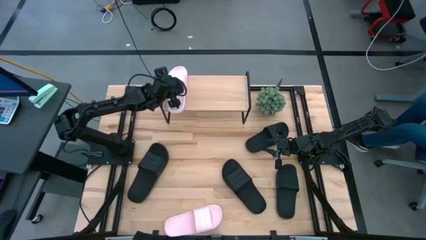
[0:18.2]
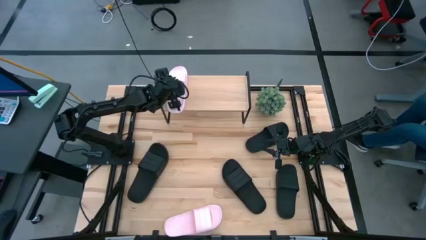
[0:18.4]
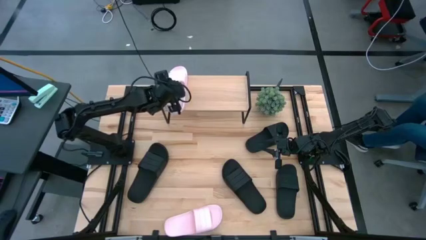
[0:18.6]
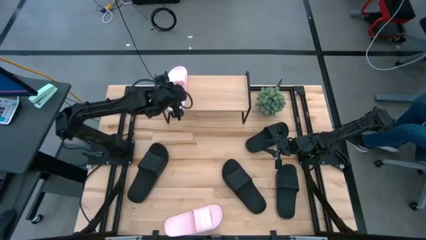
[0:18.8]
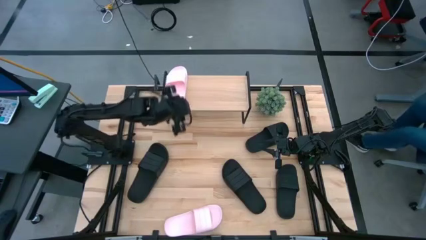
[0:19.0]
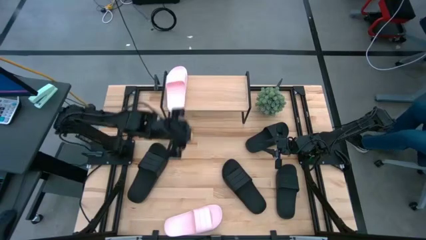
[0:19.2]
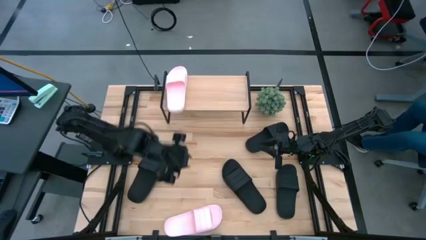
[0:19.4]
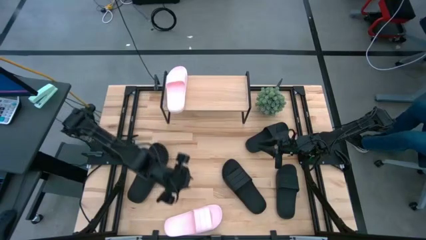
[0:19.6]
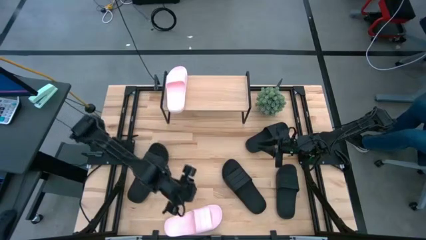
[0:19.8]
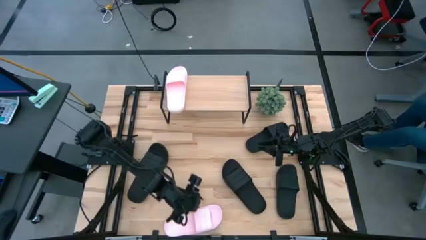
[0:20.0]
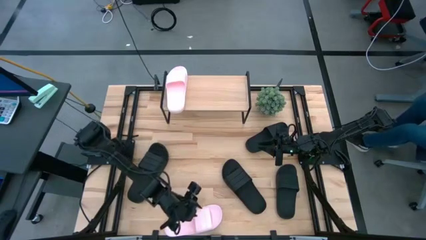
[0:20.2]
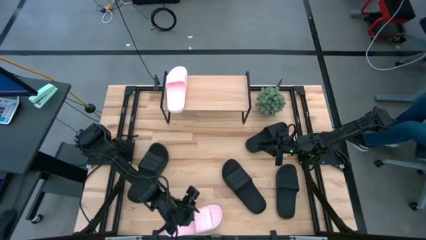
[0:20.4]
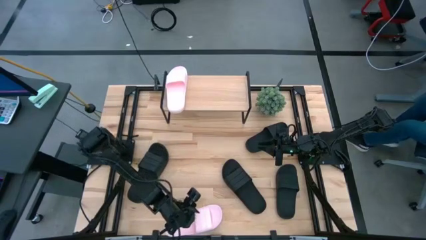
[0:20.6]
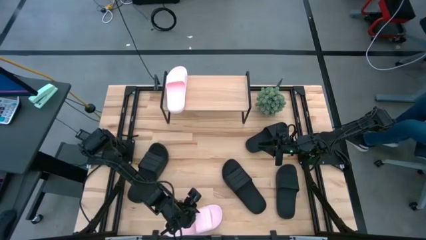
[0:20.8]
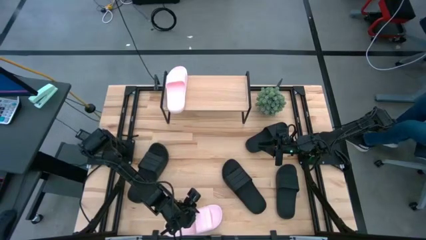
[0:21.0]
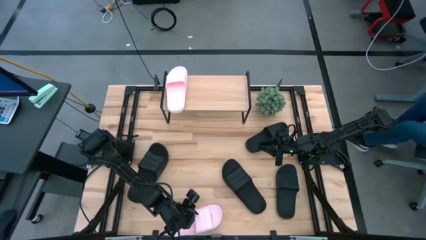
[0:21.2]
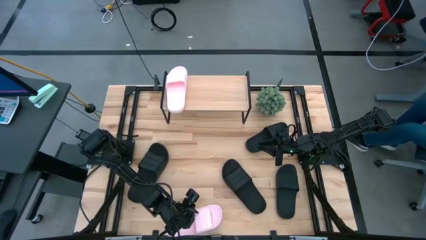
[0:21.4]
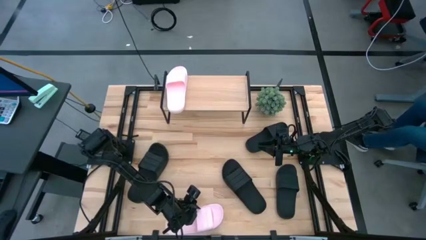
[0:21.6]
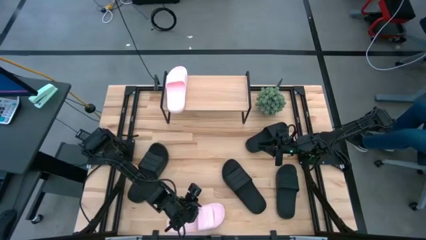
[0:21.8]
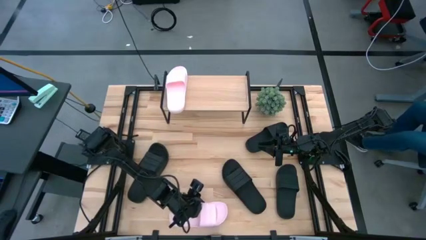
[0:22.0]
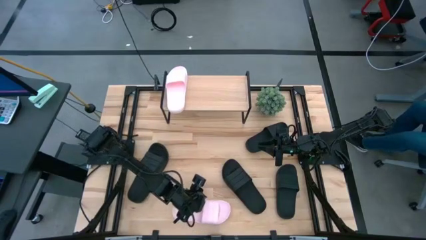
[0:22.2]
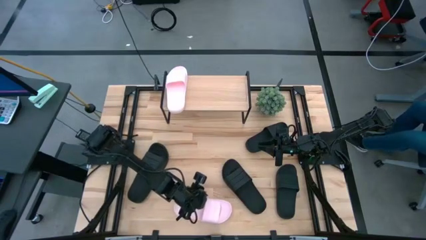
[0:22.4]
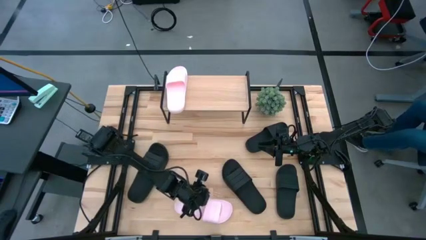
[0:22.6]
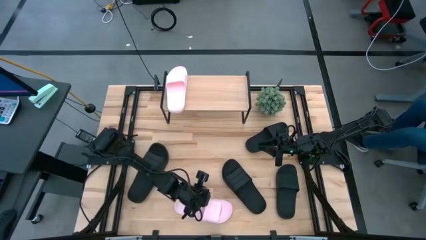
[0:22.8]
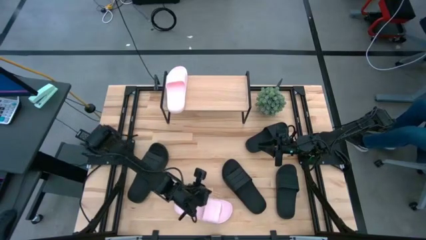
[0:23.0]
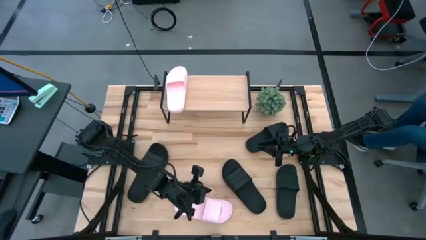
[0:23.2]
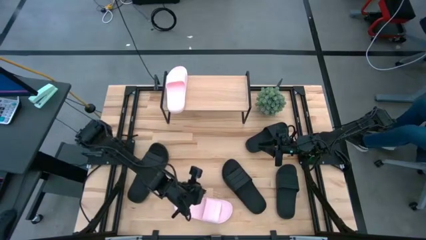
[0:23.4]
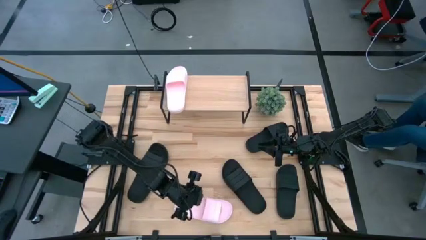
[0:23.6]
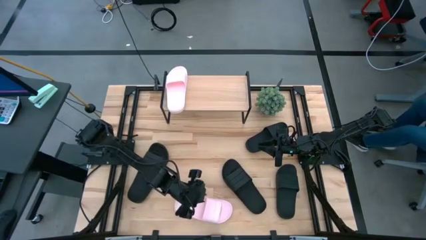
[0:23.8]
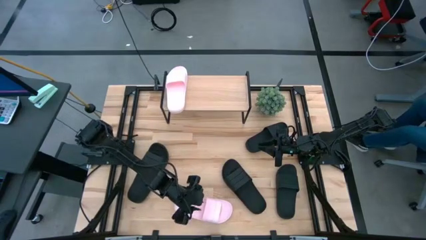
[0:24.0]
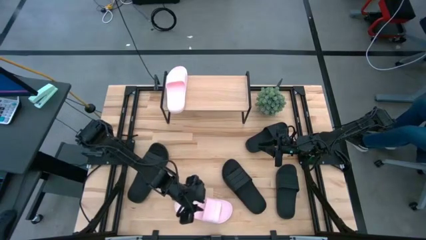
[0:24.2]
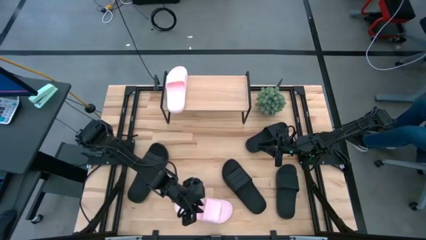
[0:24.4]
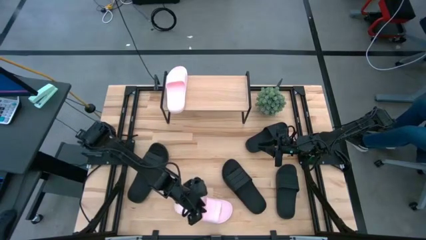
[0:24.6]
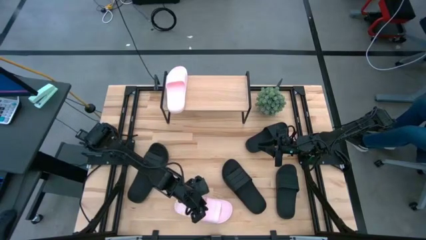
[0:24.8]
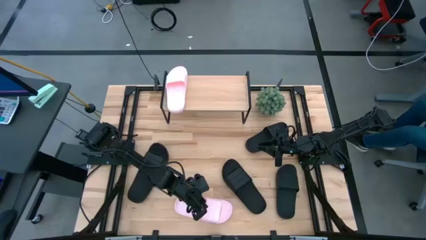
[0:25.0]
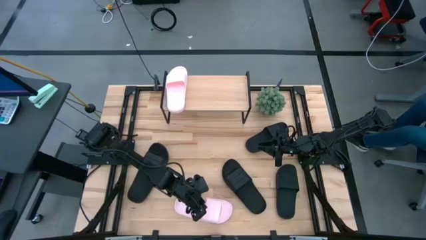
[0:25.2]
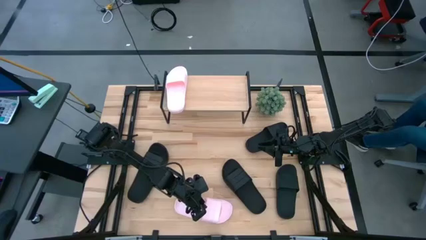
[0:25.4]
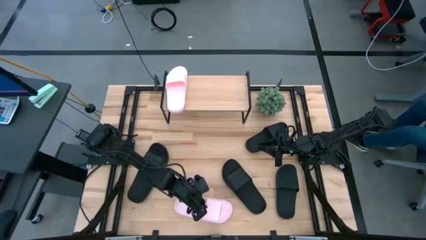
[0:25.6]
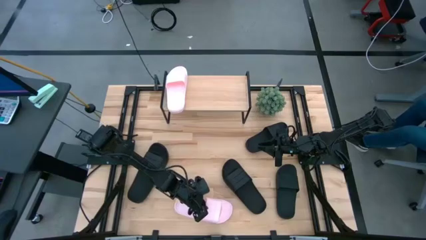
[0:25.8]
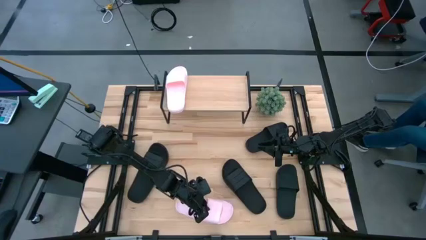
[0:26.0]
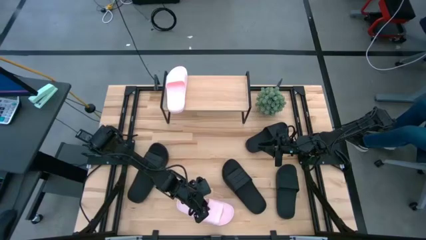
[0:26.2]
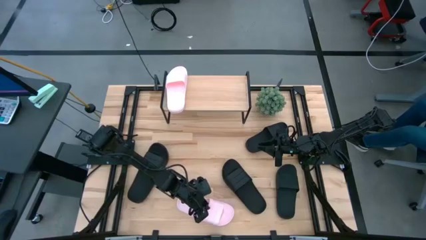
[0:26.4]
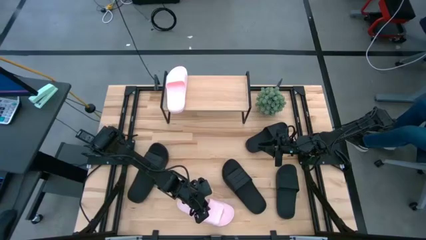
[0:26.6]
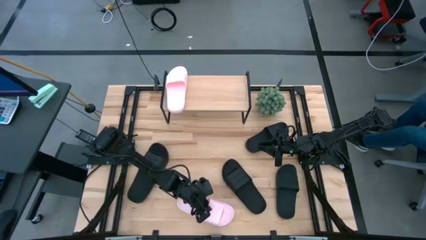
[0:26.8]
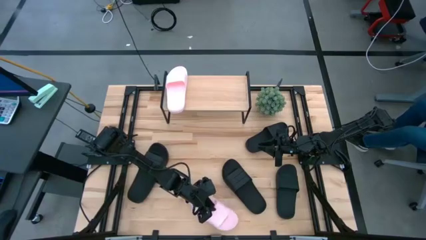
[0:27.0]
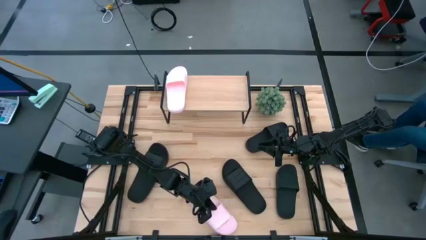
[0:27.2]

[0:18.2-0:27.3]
Task: Pick and place slides into the shelf
Put the pink slipper on the shelf

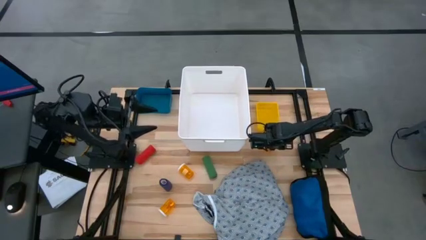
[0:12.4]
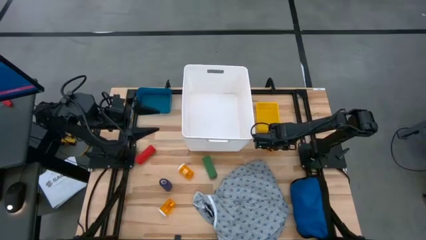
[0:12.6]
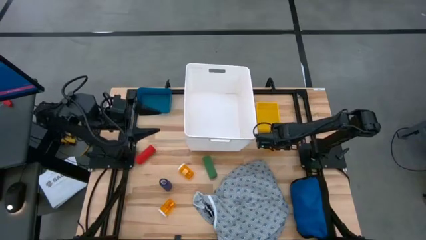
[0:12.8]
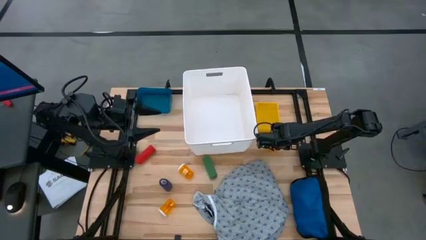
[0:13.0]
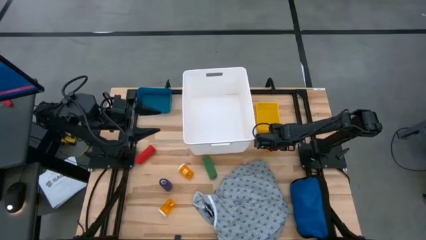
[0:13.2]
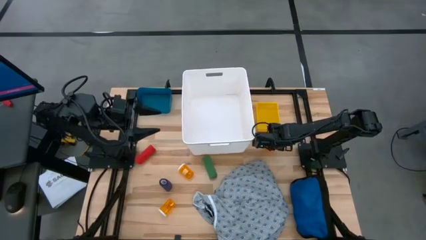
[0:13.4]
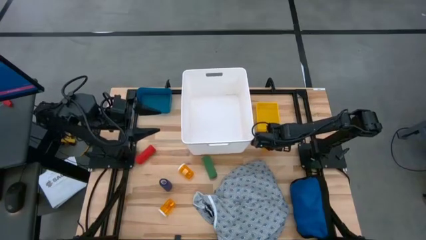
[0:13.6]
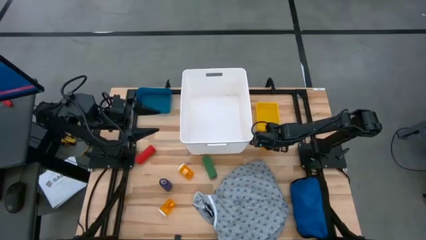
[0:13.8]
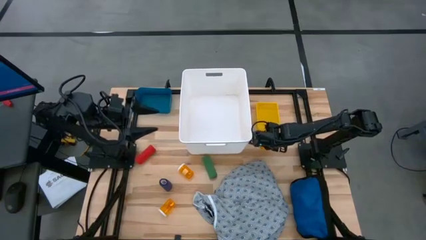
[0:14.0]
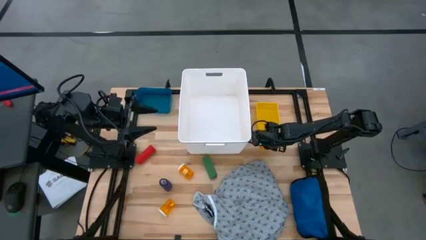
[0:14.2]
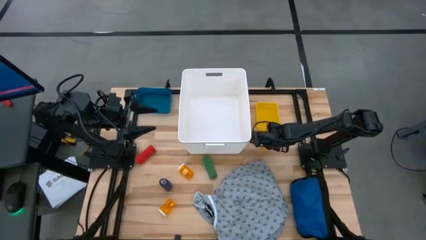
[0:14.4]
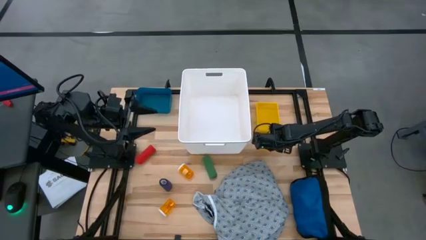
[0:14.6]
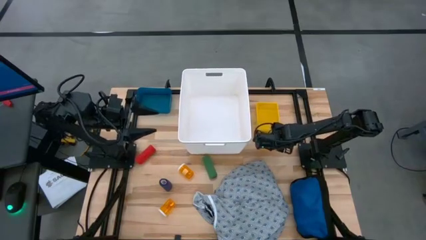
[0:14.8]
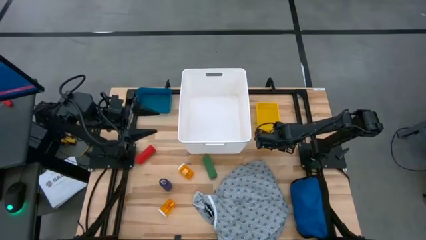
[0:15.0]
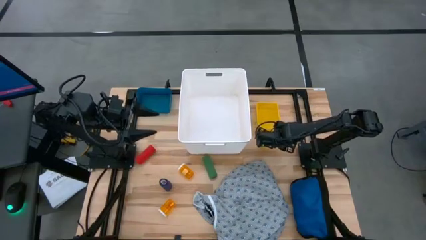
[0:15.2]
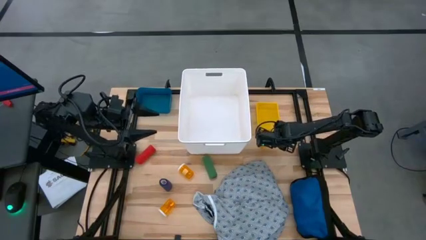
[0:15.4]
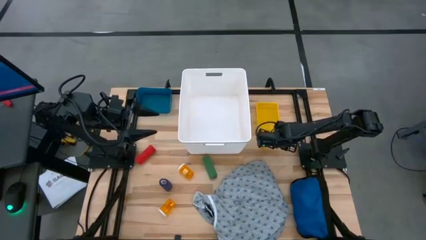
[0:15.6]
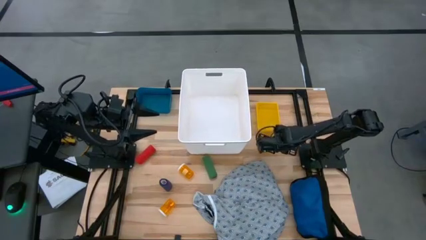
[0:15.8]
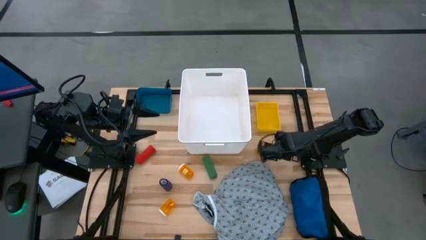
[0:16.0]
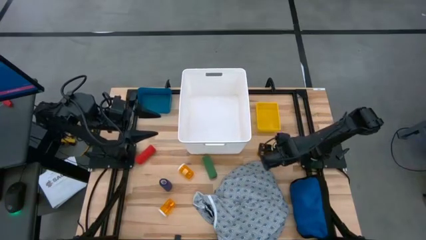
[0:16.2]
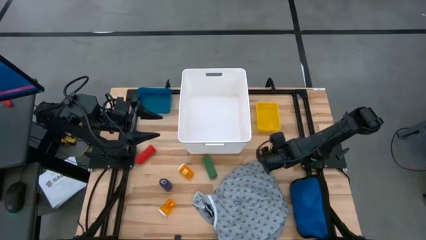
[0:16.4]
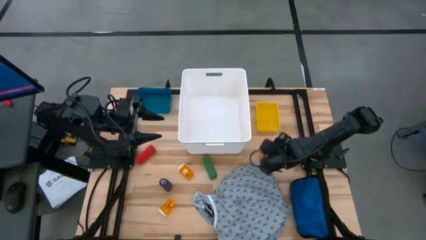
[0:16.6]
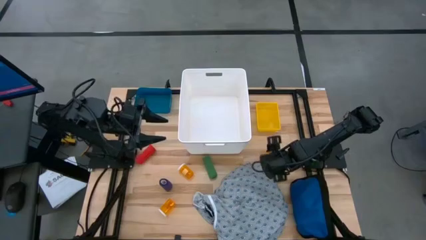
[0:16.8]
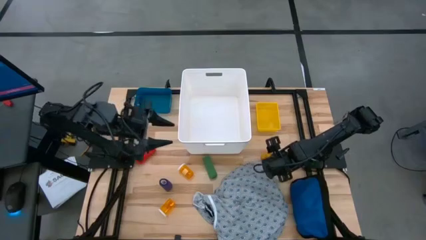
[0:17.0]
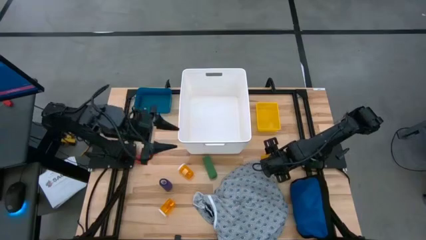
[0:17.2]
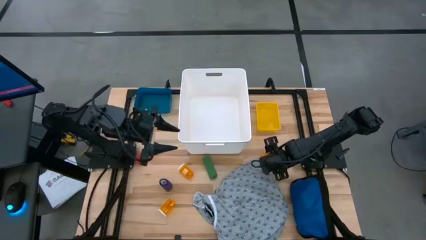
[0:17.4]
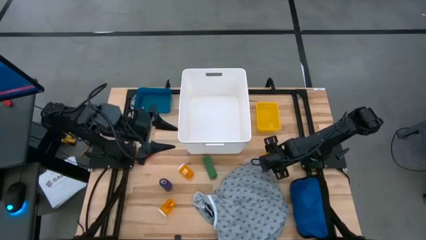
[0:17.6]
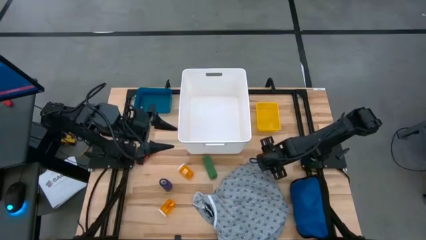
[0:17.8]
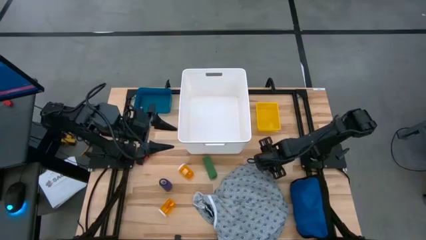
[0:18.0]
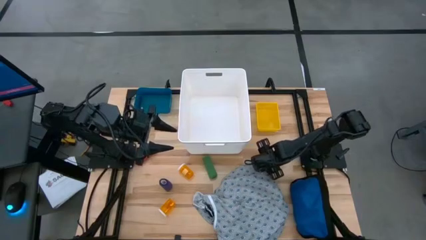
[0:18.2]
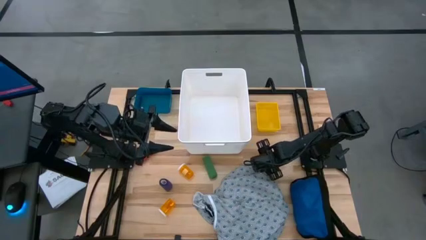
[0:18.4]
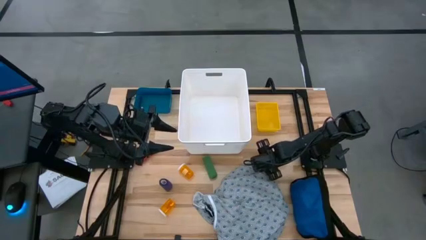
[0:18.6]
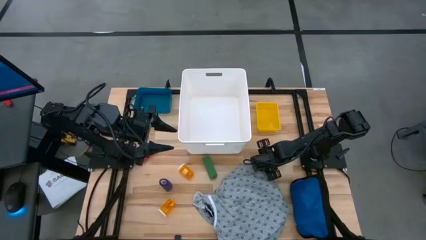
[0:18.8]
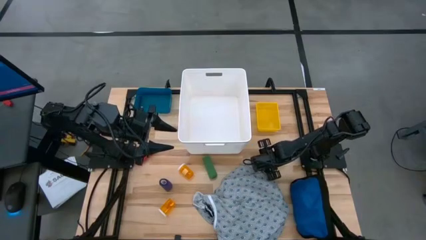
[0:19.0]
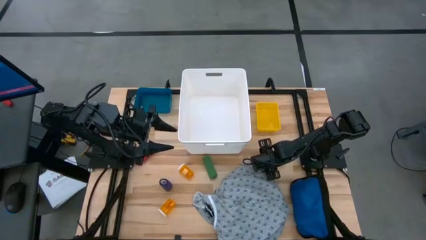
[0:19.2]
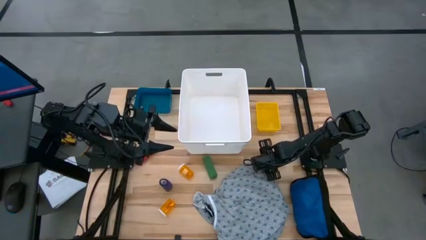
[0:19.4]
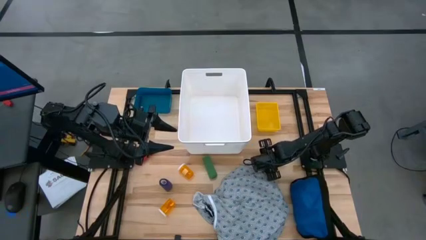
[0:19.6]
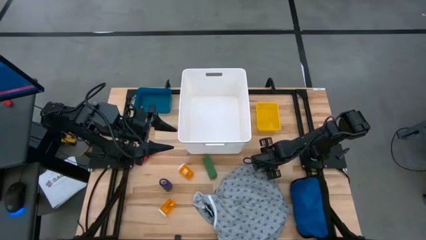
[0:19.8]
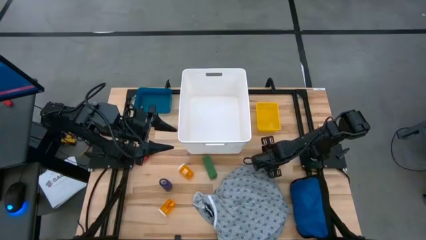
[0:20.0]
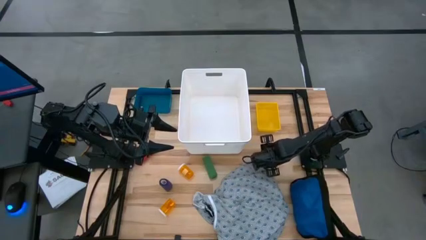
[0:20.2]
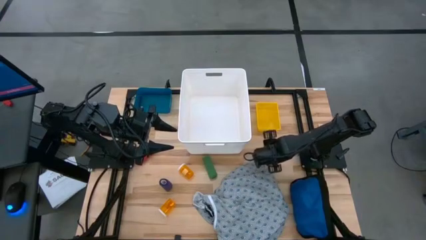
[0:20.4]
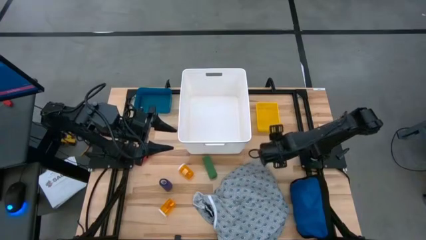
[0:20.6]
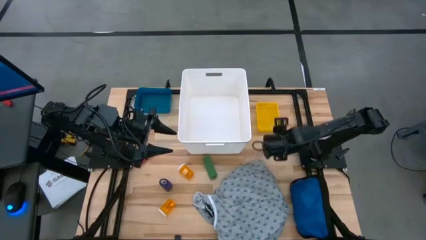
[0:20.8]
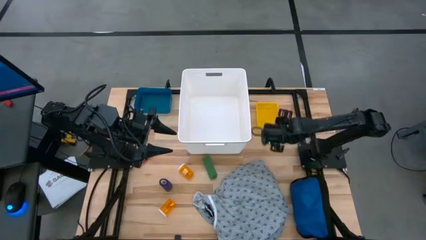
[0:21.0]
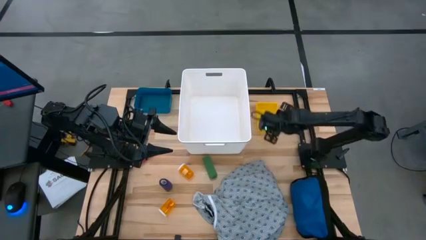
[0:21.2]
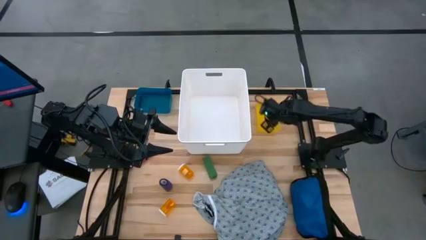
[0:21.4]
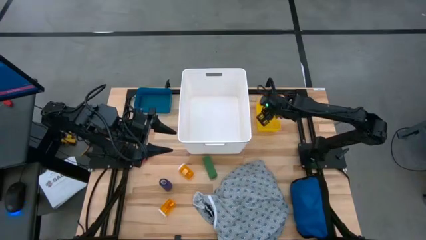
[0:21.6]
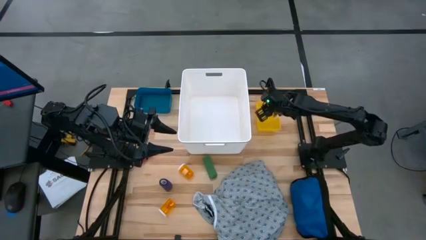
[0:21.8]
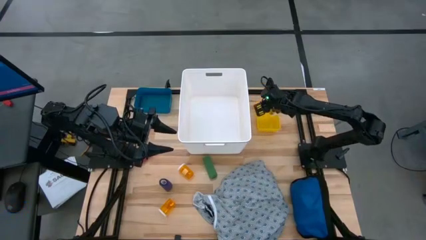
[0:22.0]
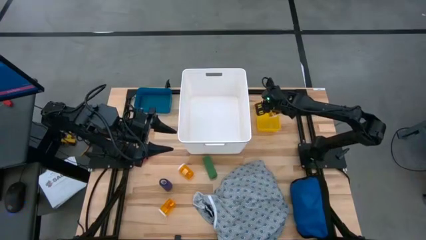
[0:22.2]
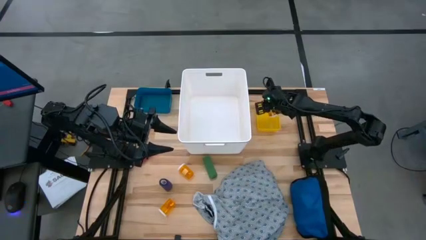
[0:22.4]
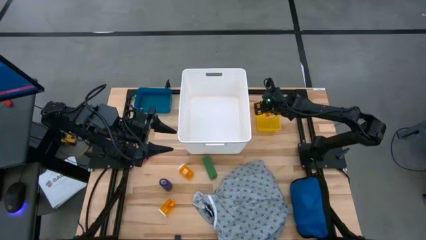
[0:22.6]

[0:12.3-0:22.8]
Task: Pick & place medical supplies in basket/bin
Put the top orange pill bottle into the yellow bin
